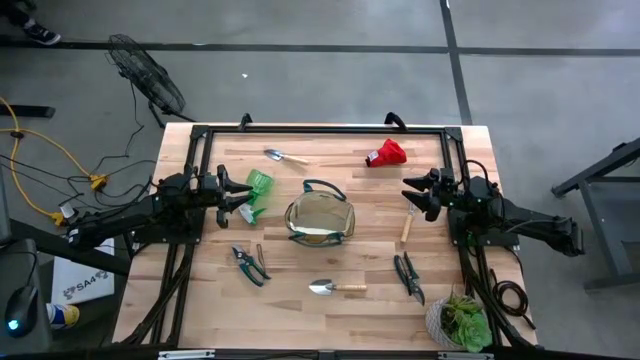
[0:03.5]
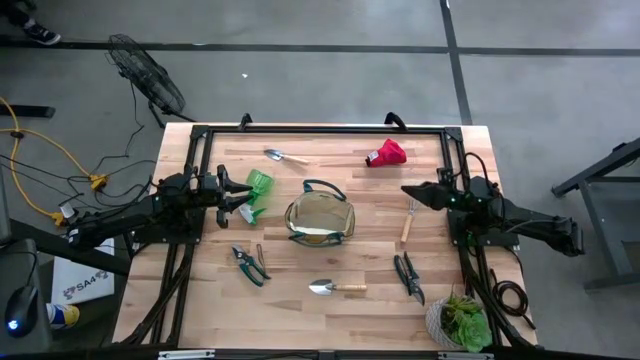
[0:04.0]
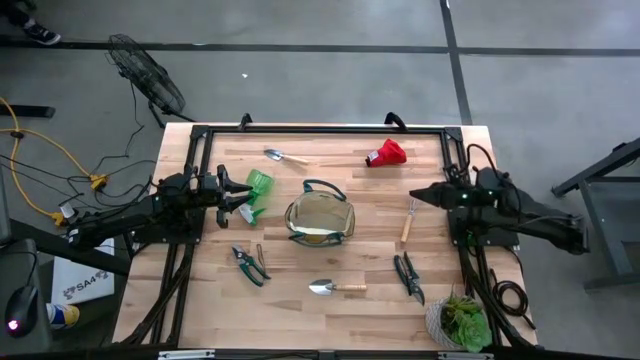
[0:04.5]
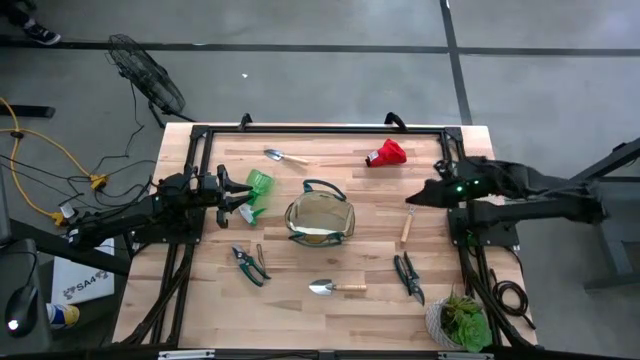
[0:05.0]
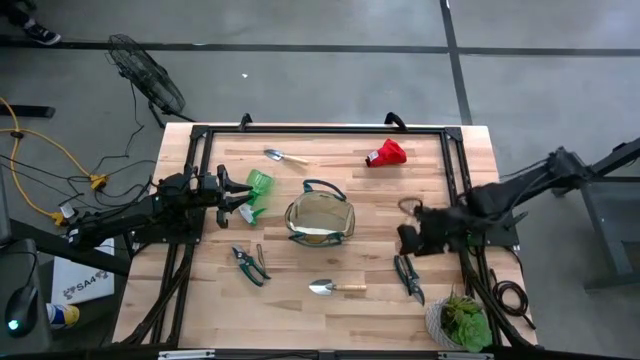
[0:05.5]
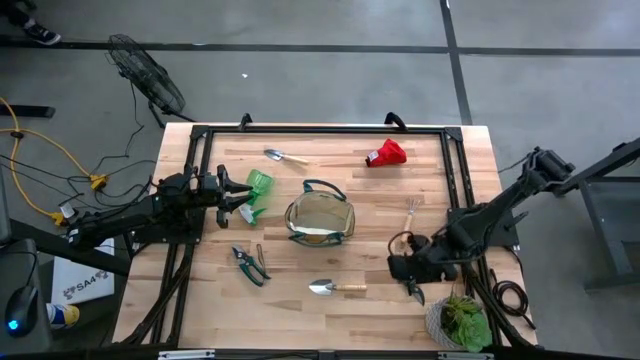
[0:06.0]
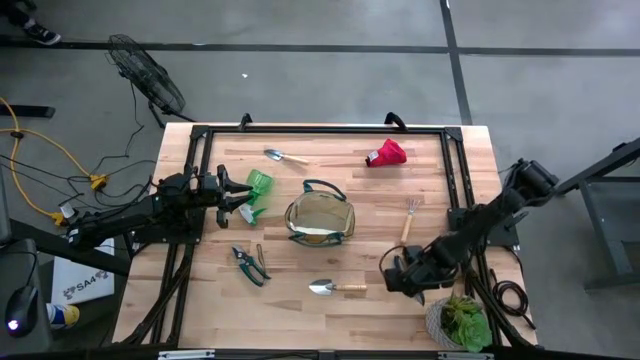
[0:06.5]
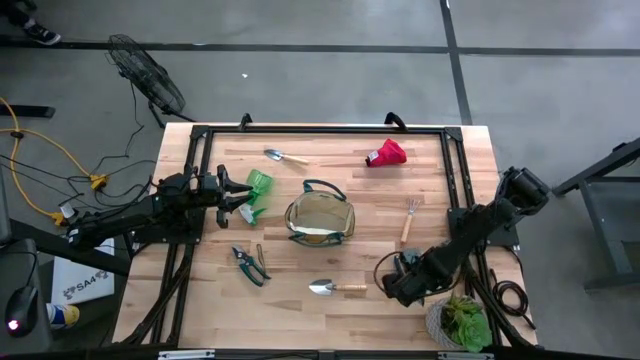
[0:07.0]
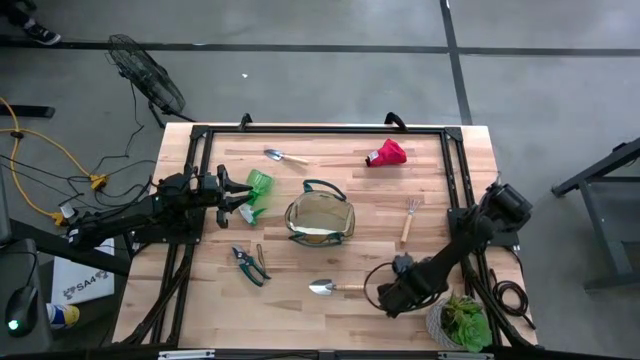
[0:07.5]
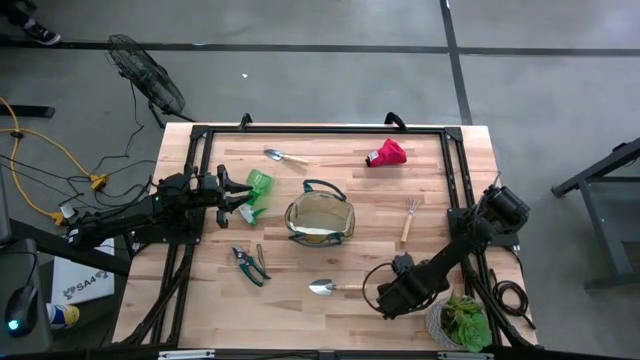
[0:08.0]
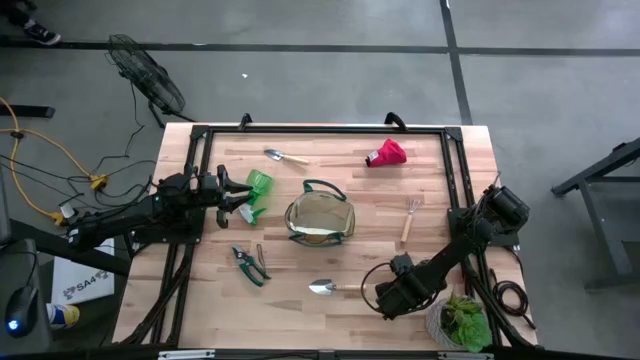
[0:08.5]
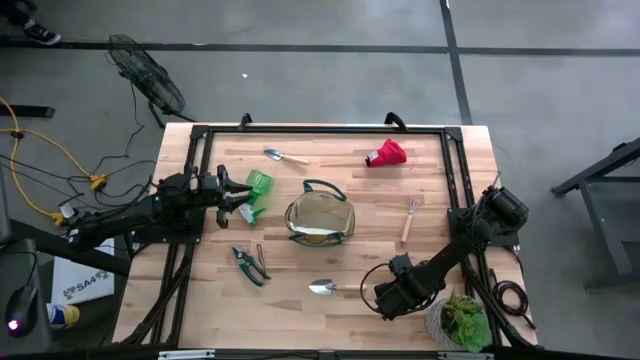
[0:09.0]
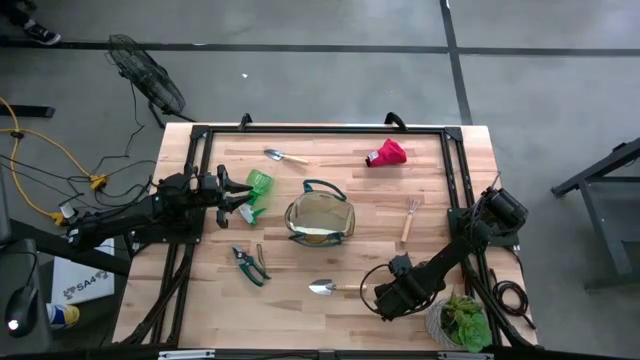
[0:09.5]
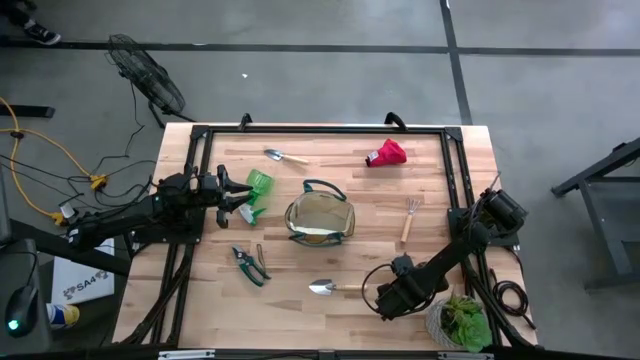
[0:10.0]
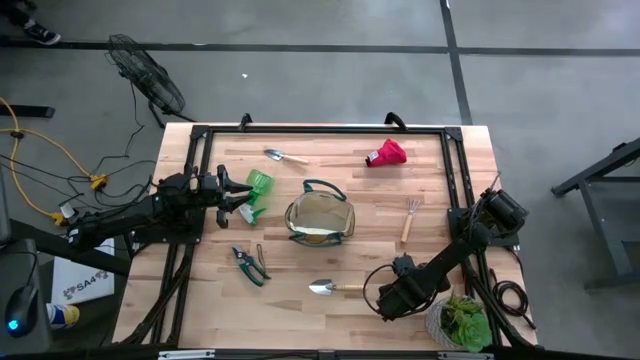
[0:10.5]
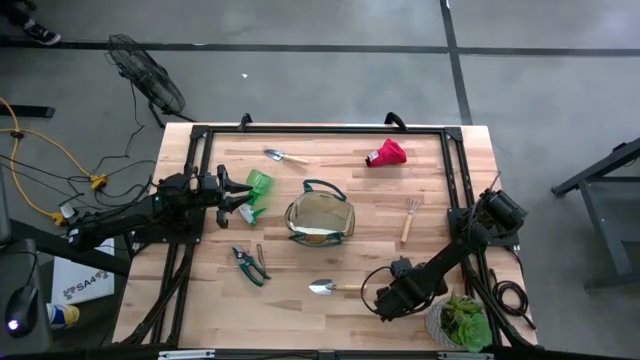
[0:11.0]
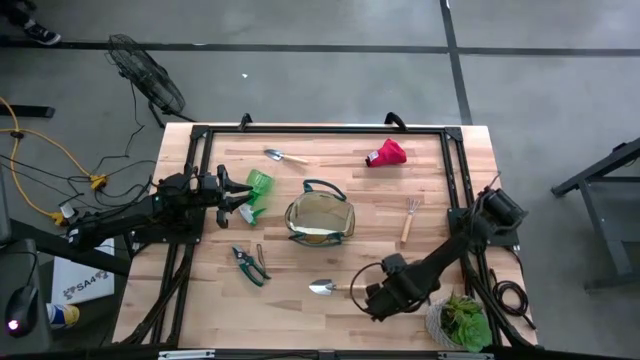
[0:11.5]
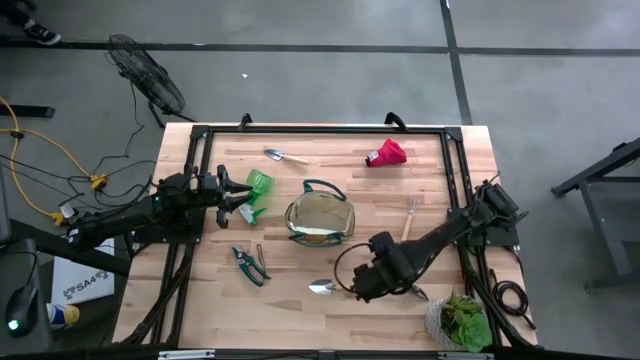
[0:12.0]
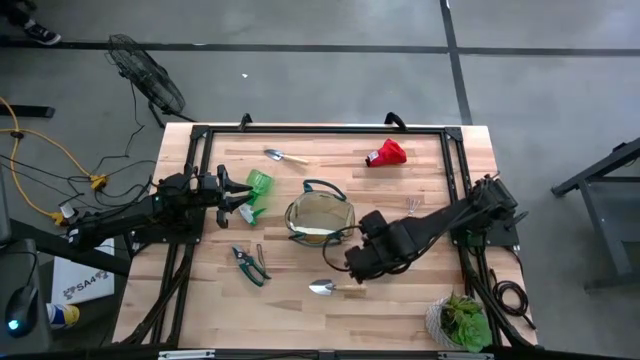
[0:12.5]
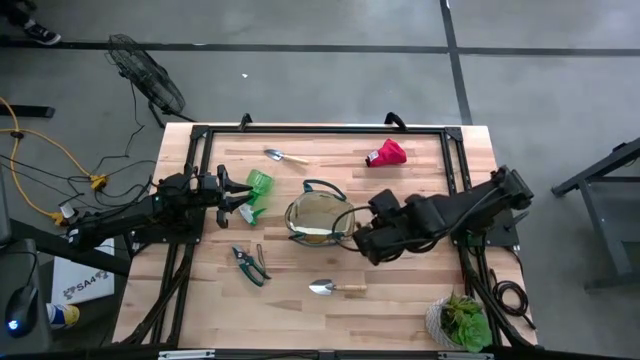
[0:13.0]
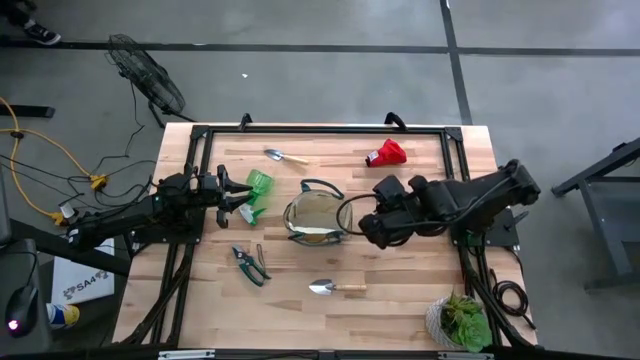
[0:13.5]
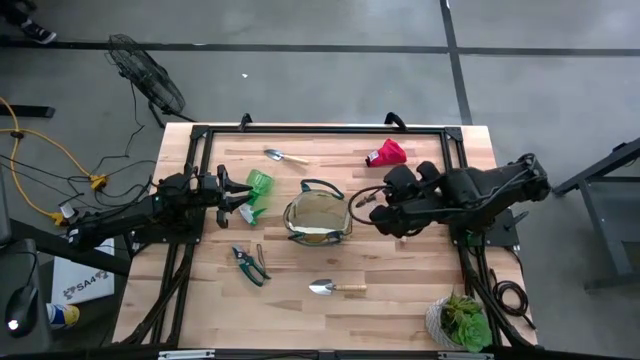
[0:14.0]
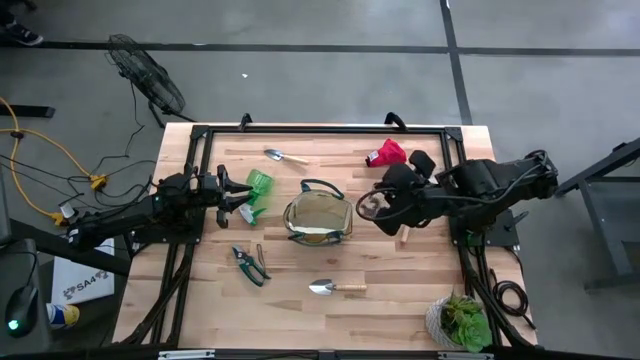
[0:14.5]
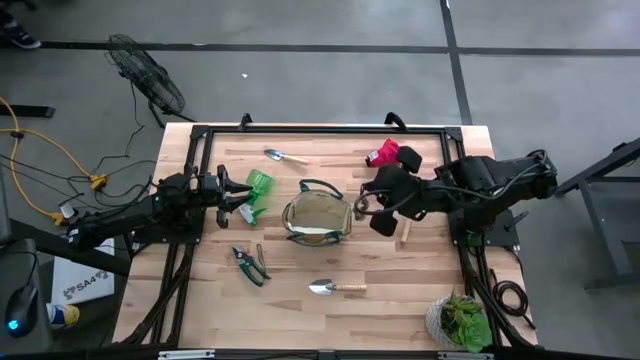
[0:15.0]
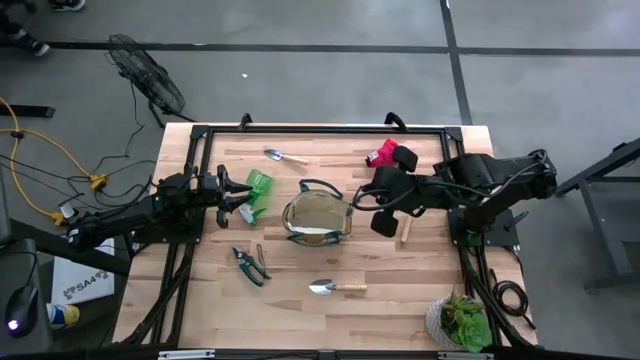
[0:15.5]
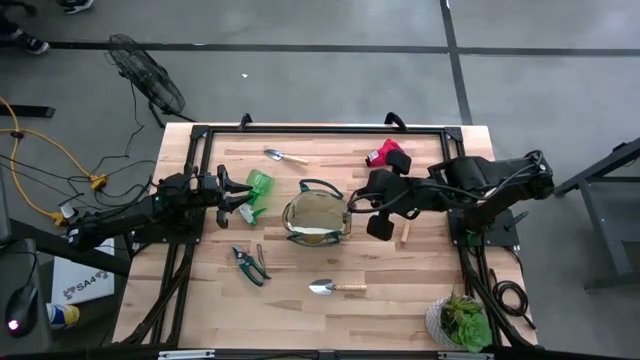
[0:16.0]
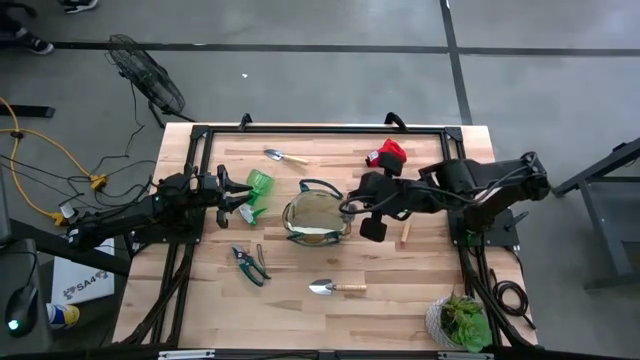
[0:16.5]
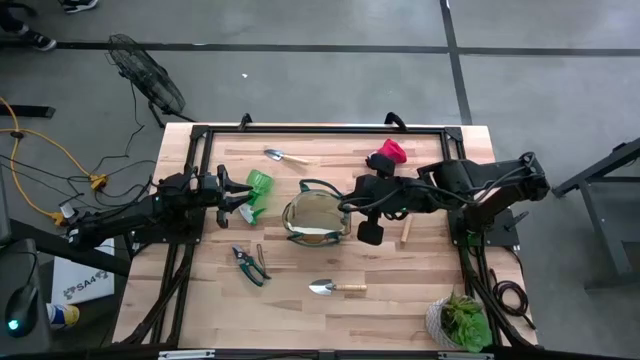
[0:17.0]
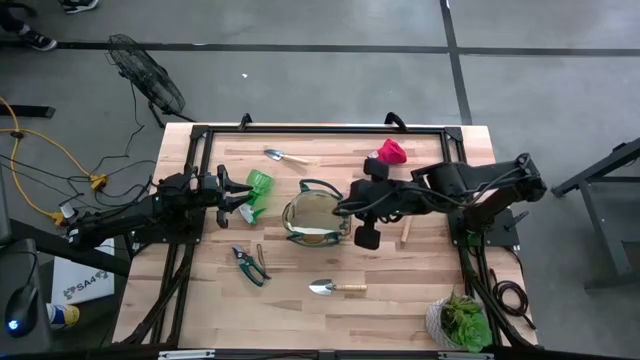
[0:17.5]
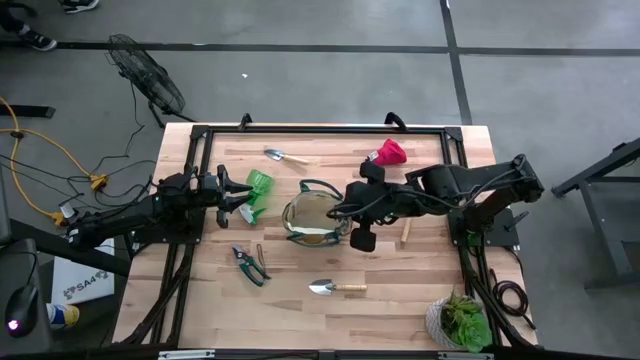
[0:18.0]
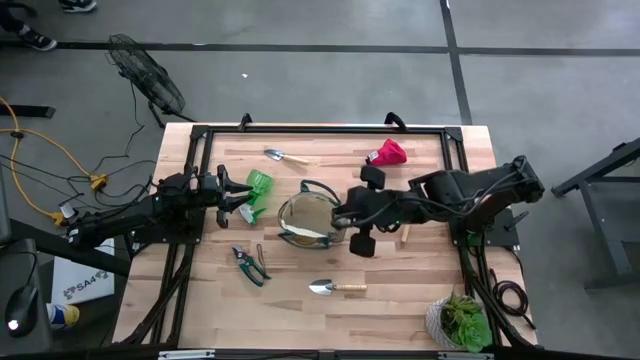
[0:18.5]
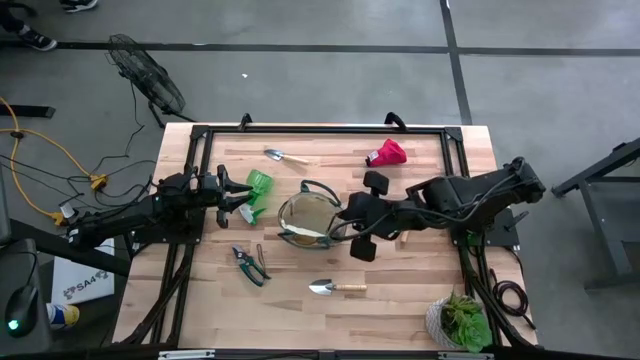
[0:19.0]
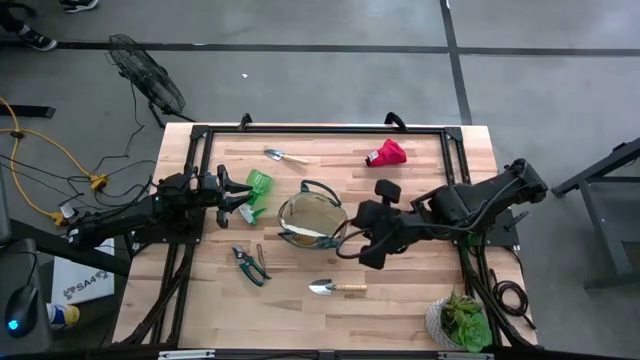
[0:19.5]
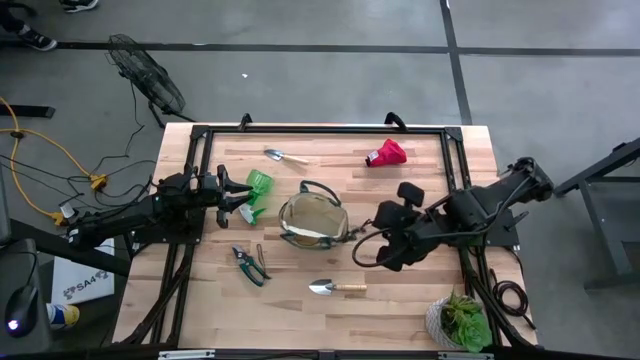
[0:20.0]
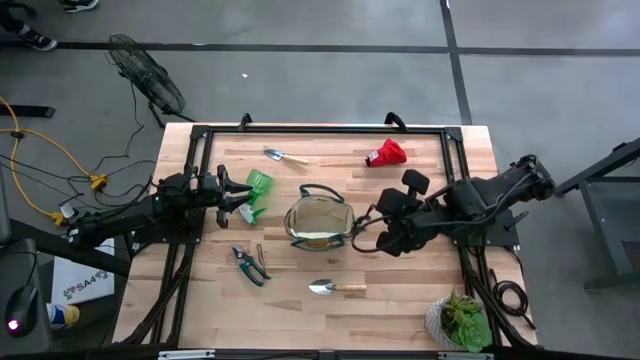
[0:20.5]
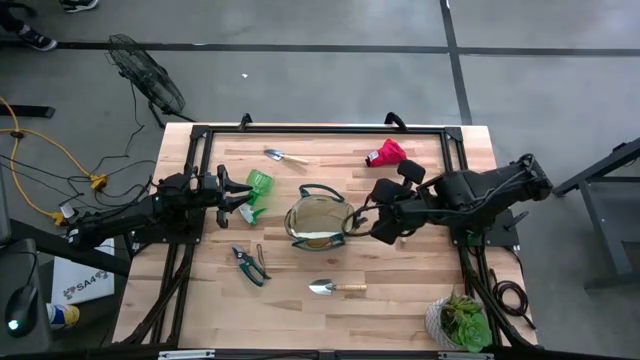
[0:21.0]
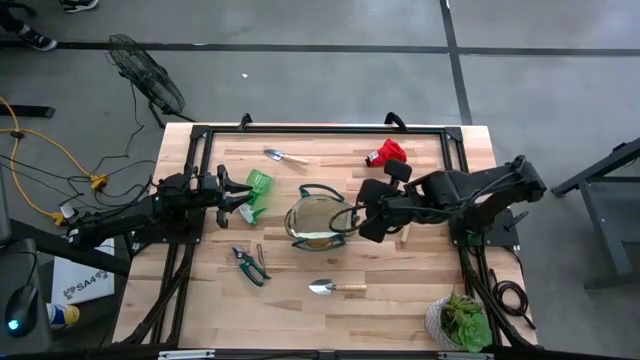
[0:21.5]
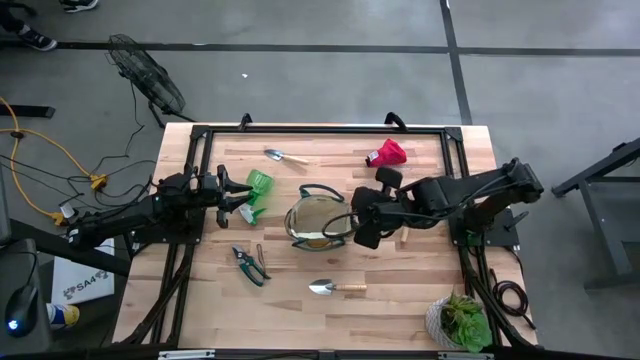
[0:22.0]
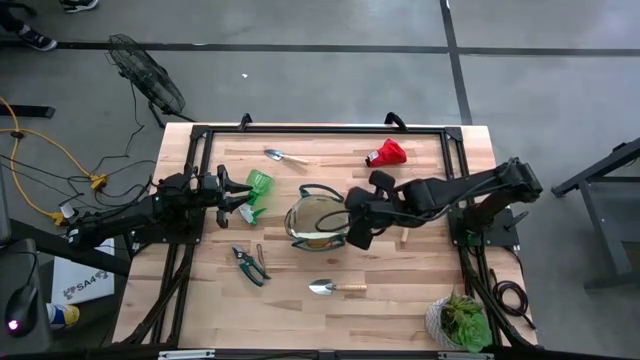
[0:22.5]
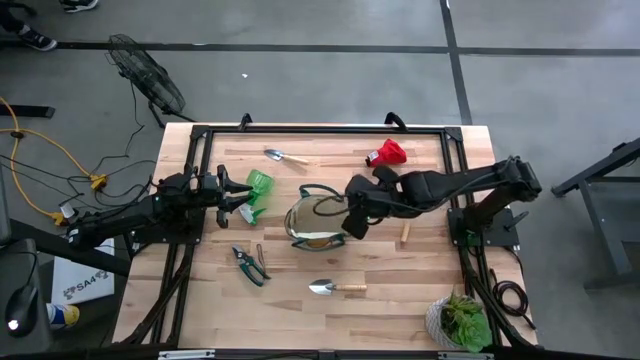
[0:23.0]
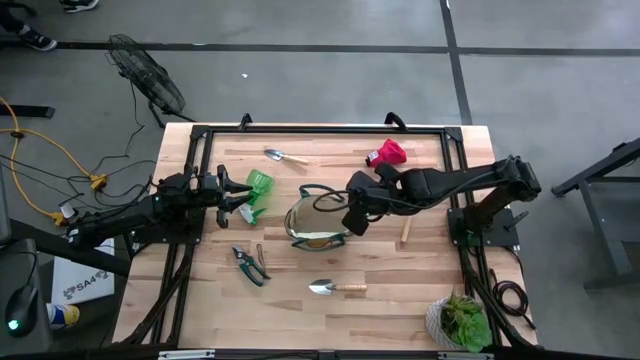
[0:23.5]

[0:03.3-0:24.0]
Task: Pick & Place Garden tools in Gardening bag
Put the right green shears into the gardening bag
